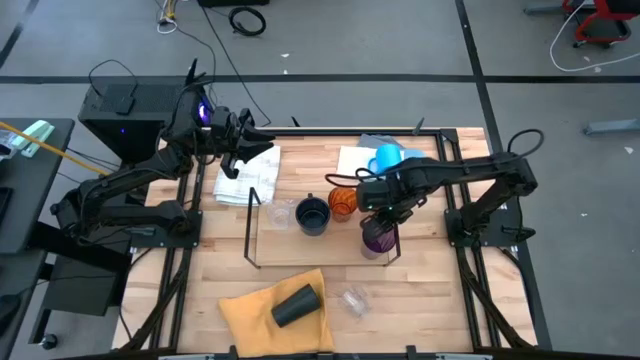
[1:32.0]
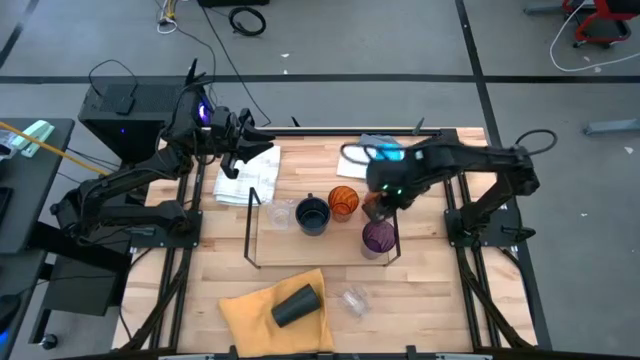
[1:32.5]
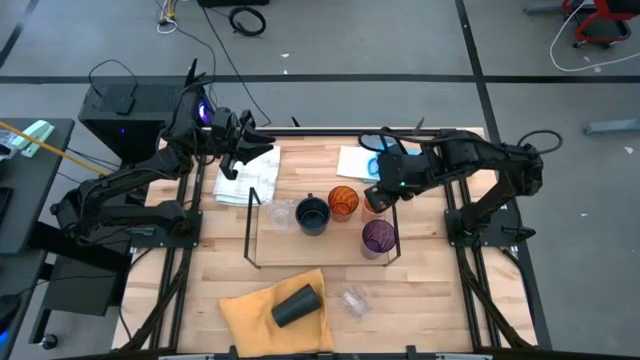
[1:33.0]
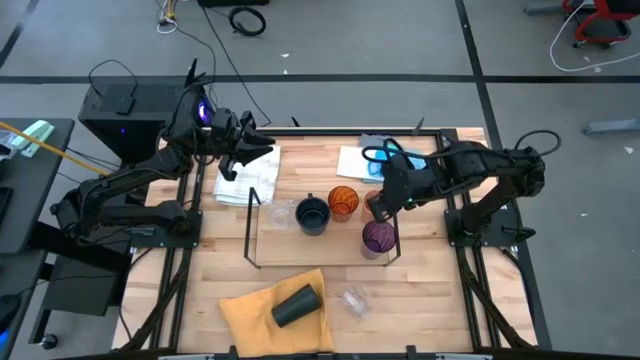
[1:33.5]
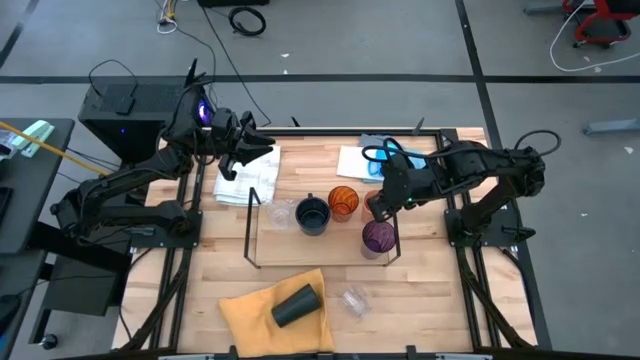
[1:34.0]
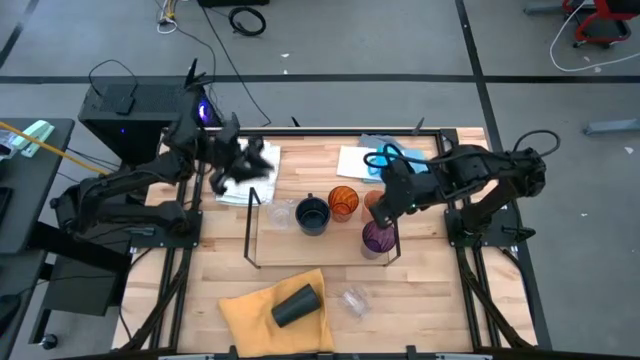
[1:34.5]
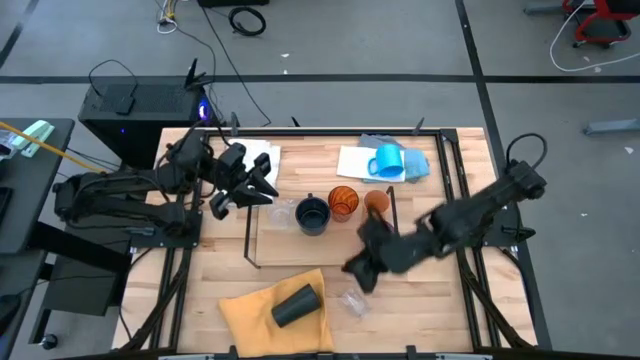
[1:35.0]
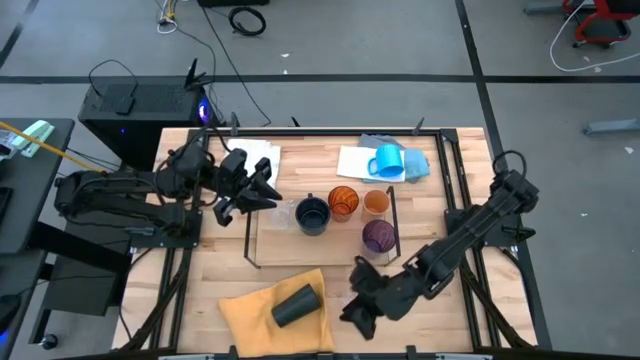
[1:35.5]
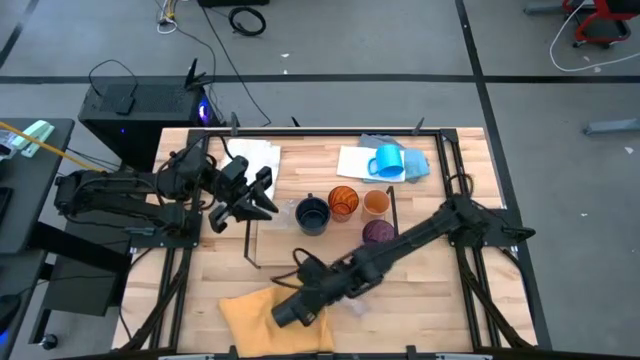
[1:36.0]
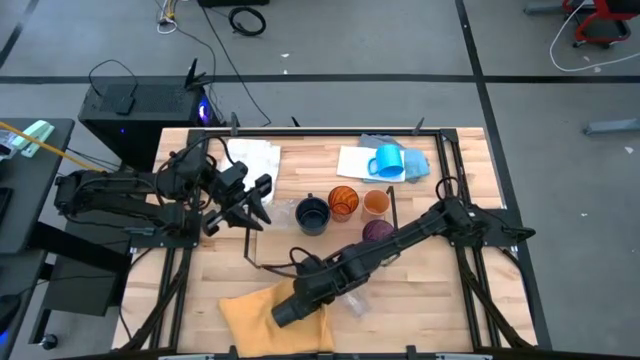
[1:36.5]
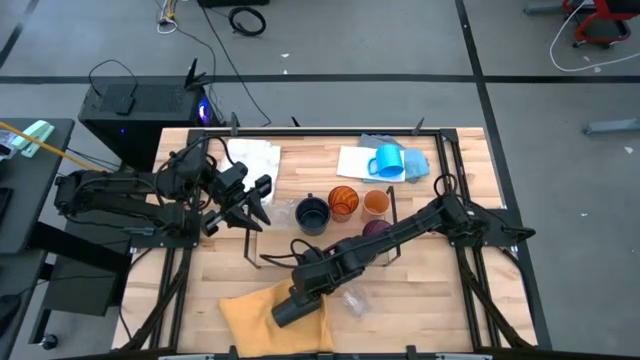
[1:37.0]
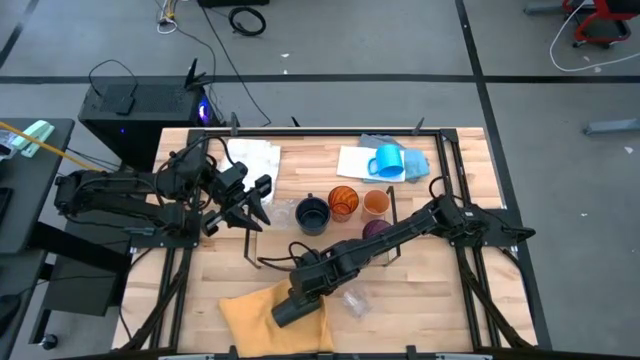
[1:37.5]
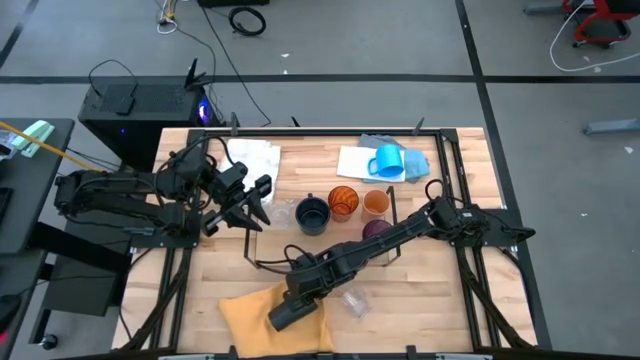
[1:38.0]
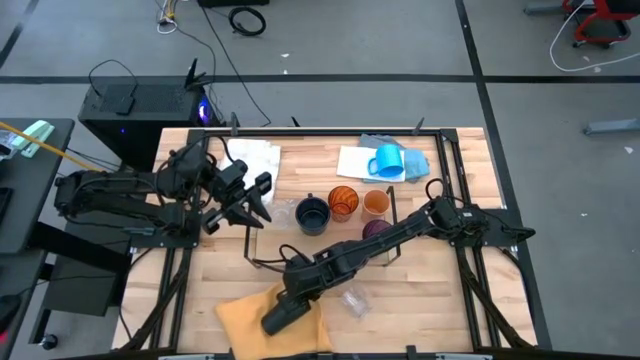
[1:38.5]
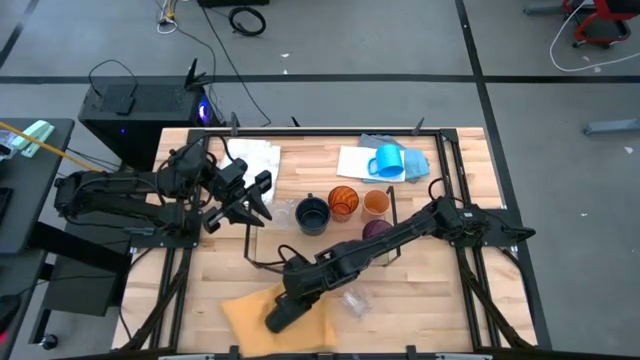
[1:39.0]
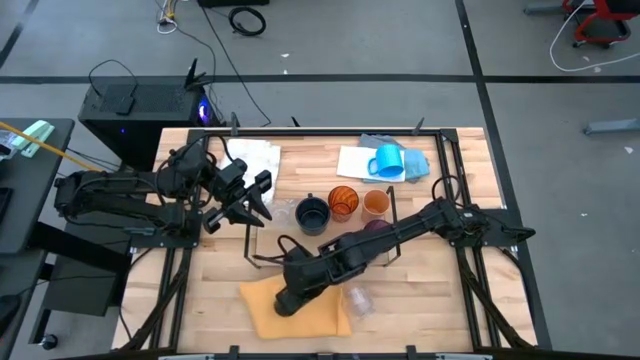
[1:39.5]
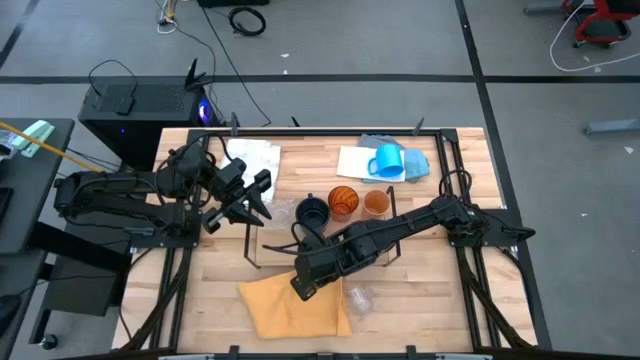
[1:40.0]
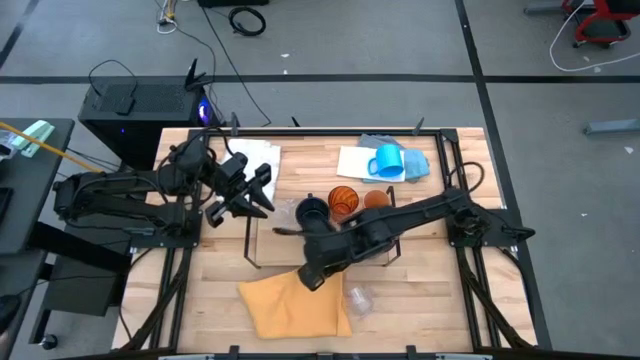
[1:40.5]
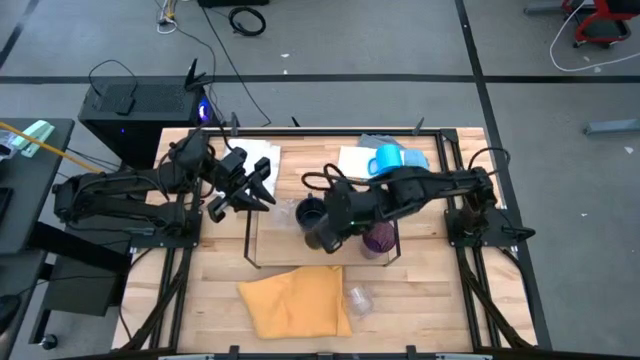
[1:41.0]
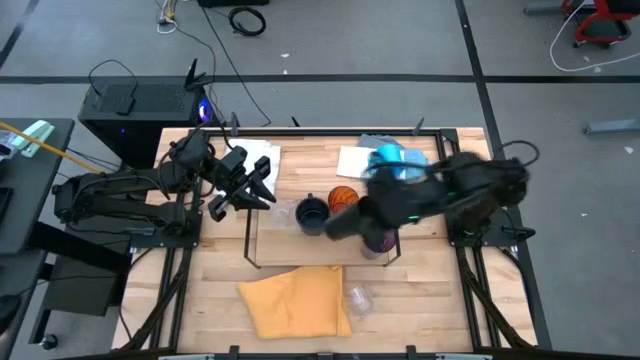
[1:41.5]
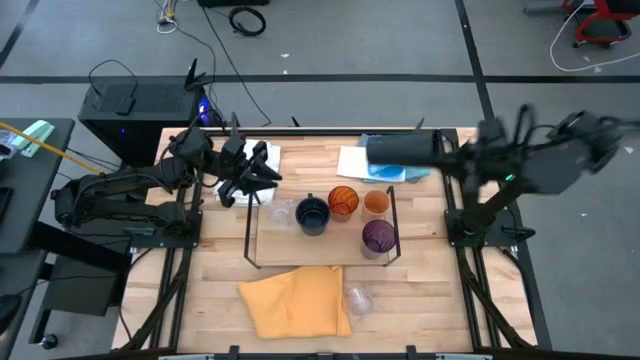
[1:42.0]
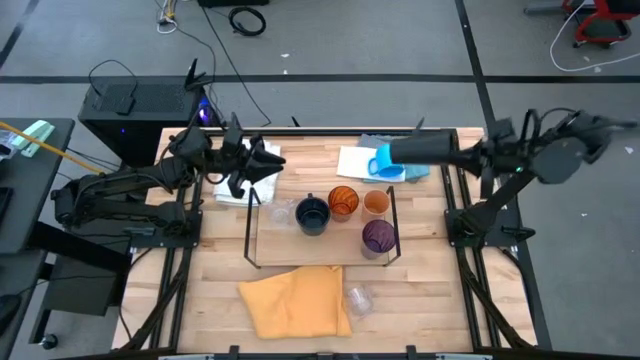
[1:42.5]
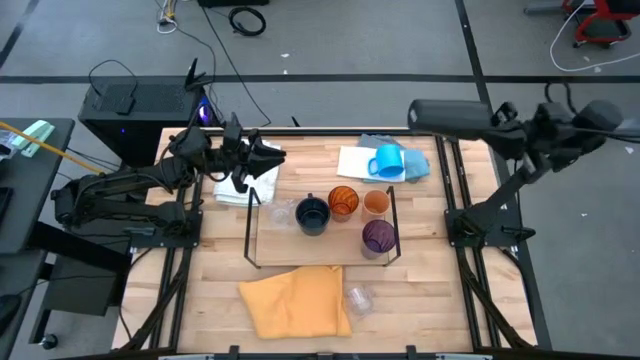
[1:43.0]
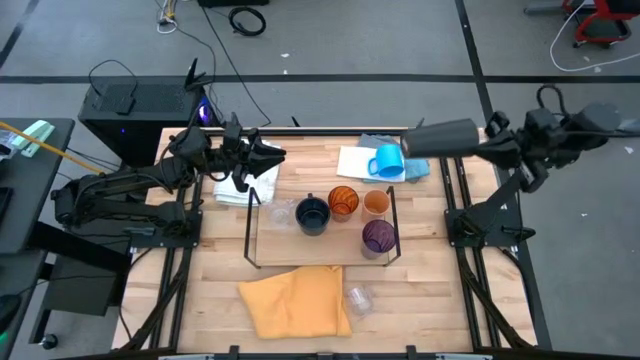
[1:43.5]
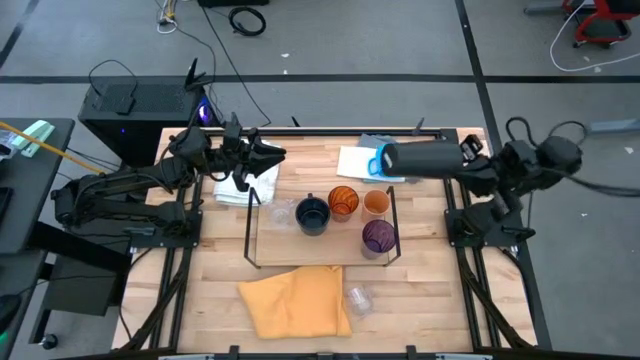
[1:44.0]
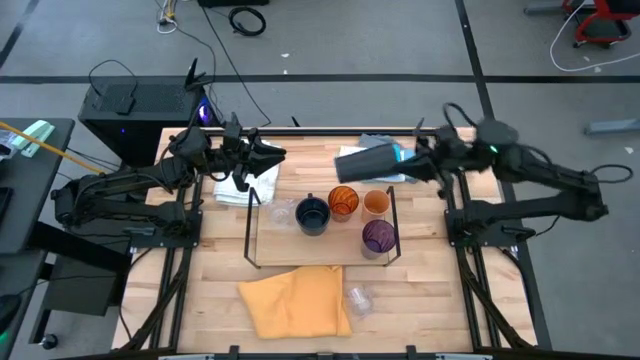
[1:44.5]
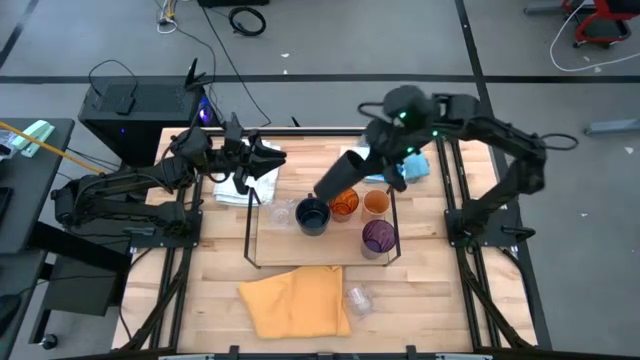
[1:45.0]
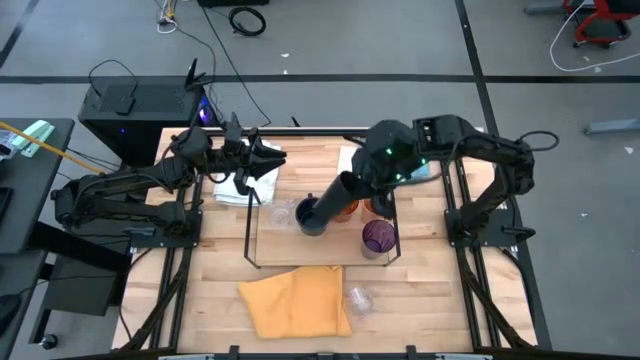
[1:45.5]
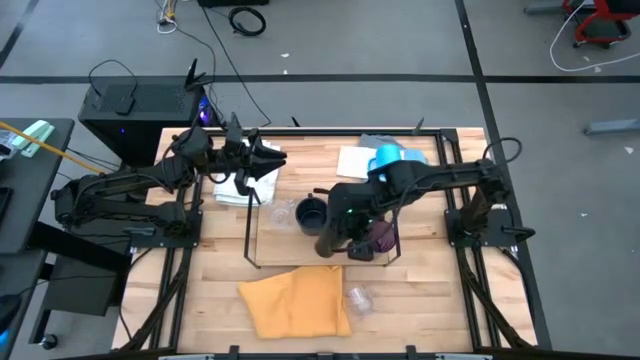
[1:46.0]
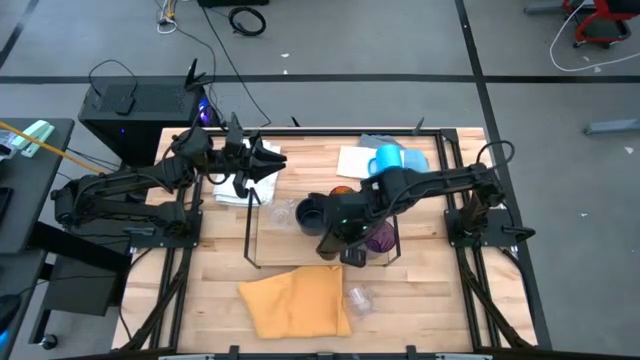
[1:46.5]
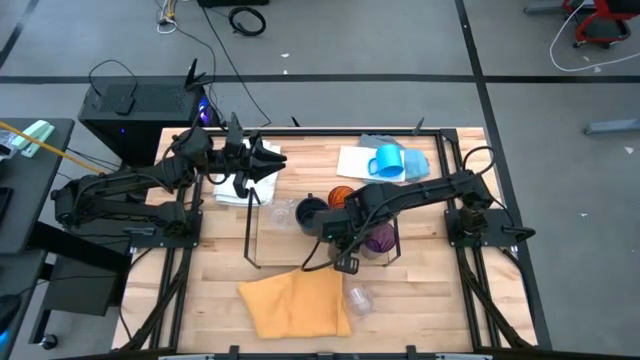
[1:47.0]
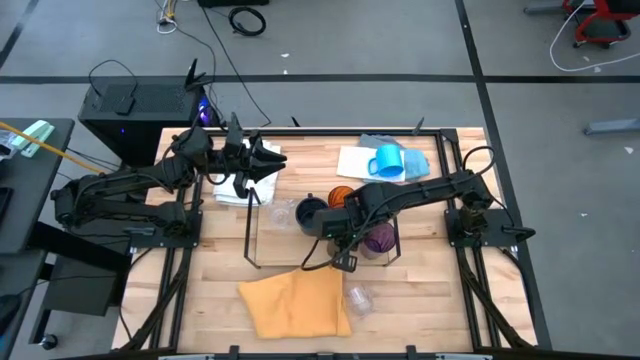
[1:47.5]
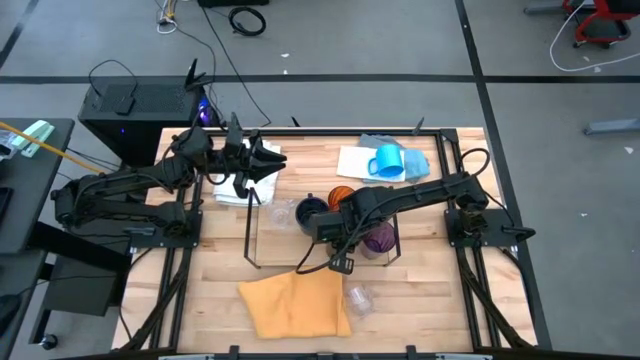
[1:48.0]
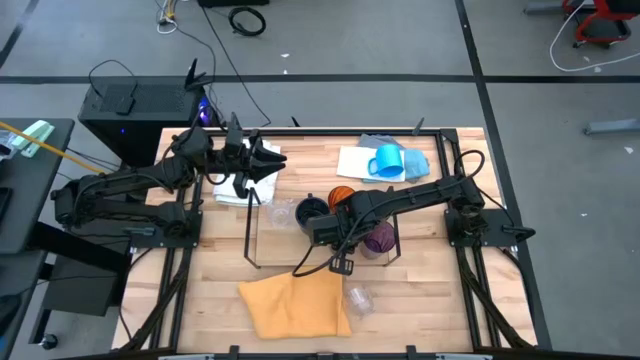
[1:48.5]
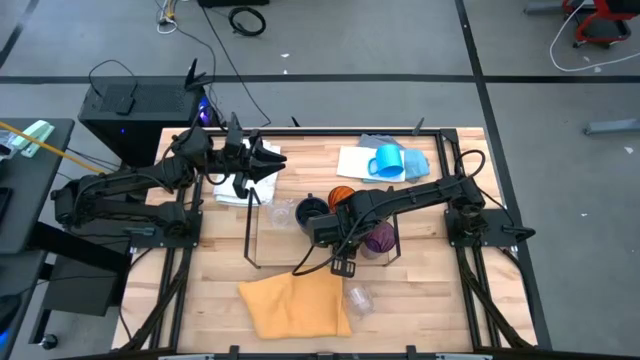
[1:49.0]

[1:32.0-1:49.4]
Task: Stack small to large cups/mugs on shelf
Put the black cup on the shelf aligned with the orange cup

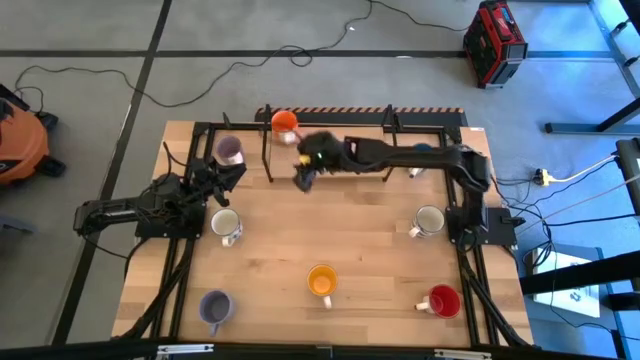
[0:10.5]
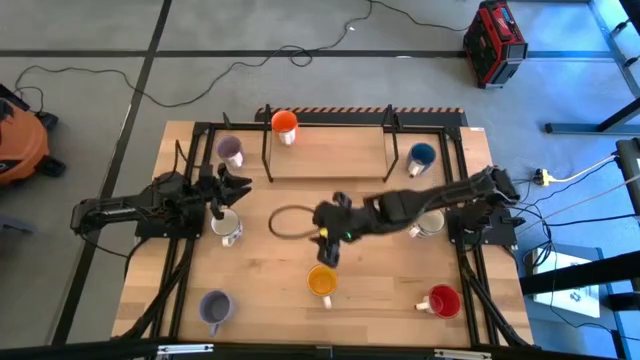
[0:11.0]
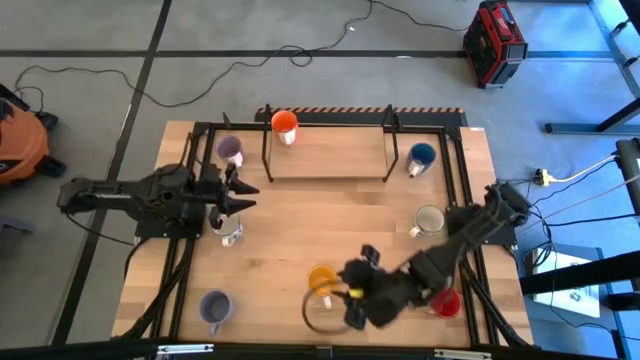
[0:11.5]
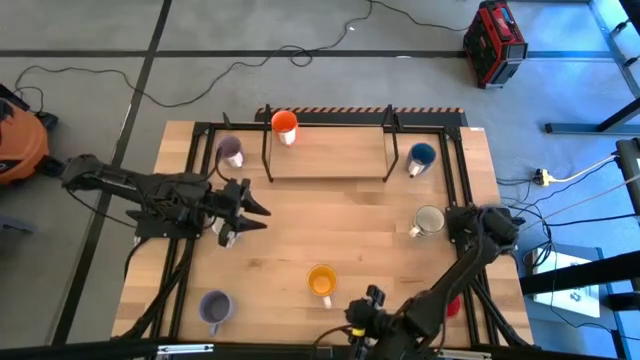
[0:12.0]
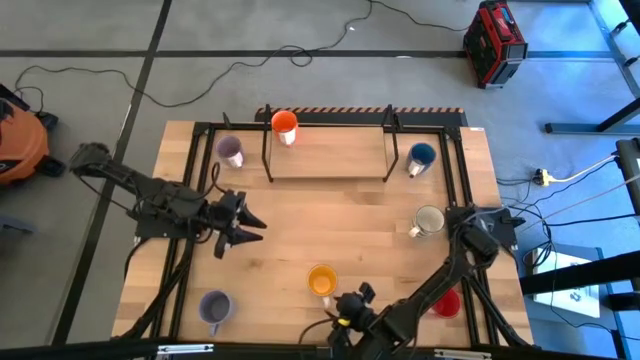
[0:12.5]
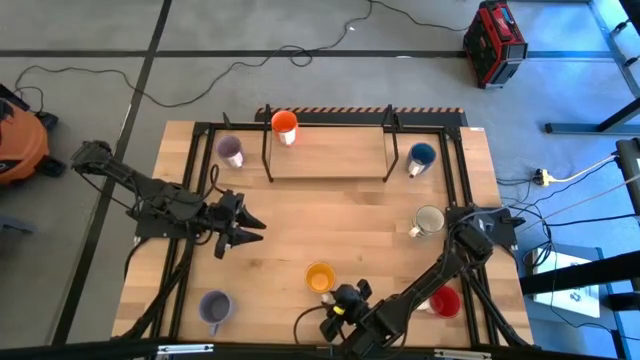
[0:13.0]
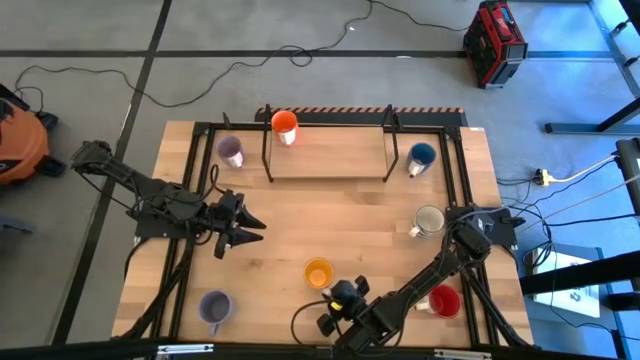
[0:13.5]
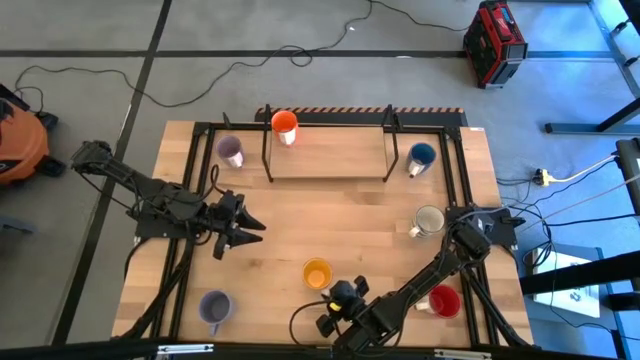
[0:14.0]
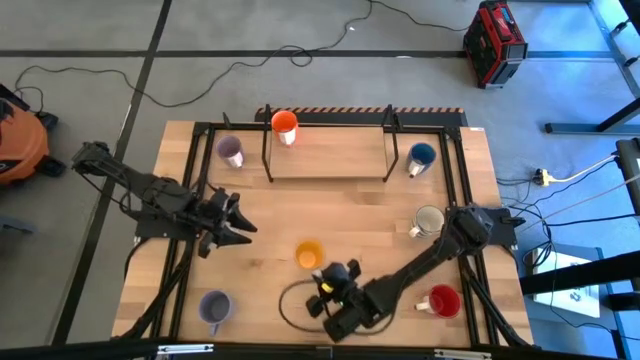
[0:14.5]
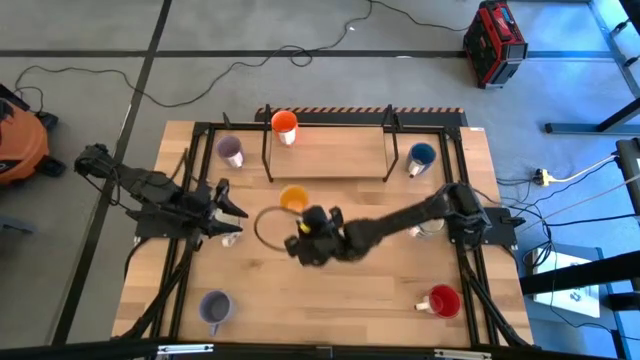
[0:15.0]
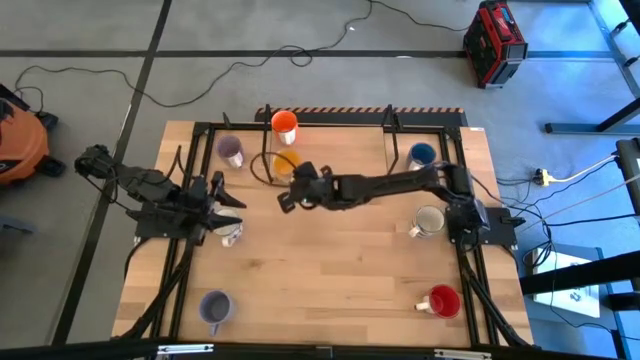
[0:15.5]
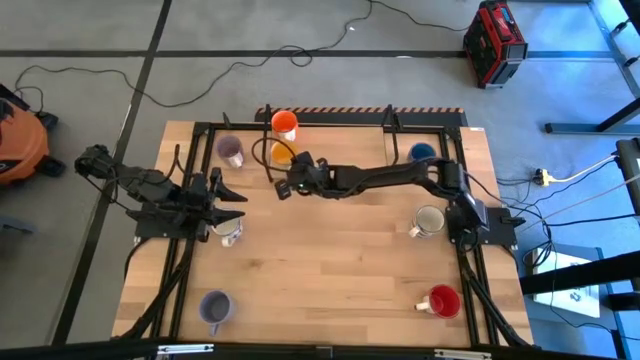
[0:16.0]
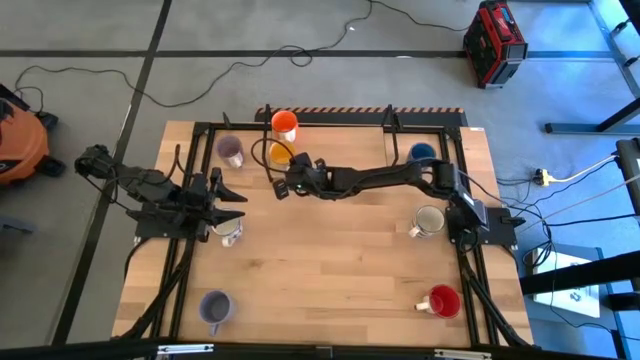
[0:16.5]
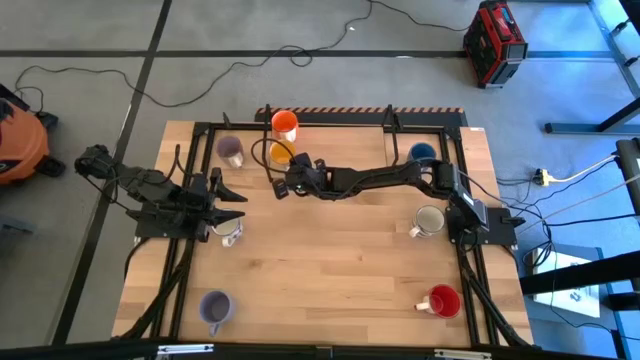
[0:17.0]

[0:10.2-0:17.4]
Task: Place coffee mugs
Put the yellow mug on the shelf aligned with the orange mug
